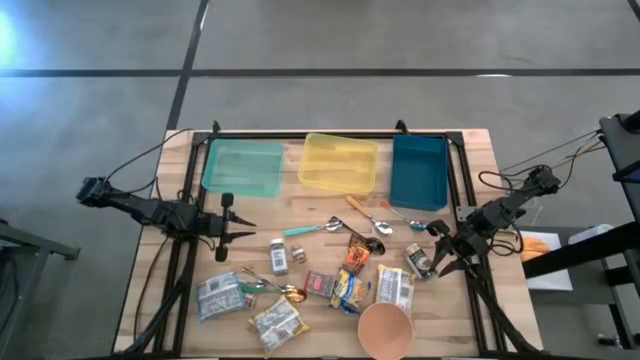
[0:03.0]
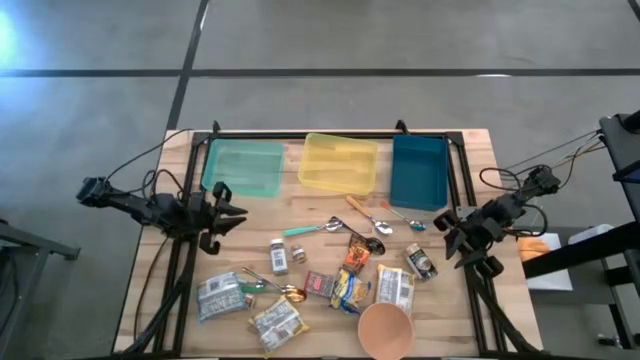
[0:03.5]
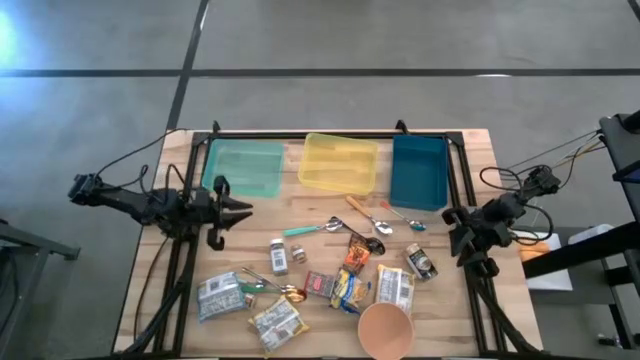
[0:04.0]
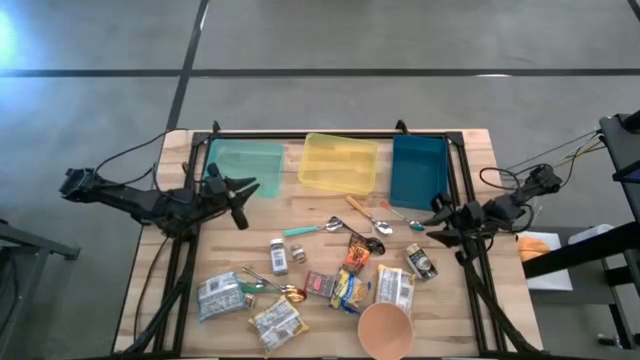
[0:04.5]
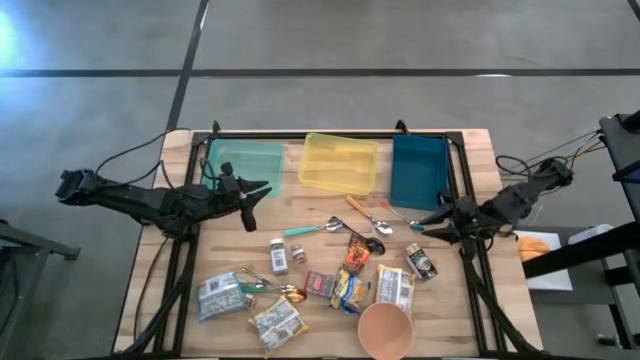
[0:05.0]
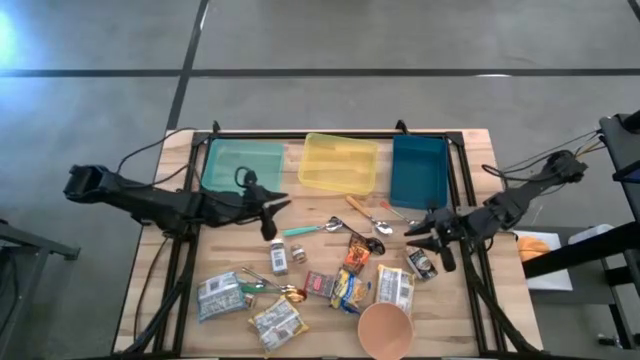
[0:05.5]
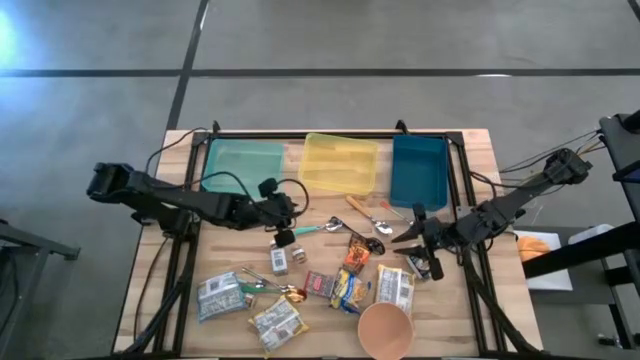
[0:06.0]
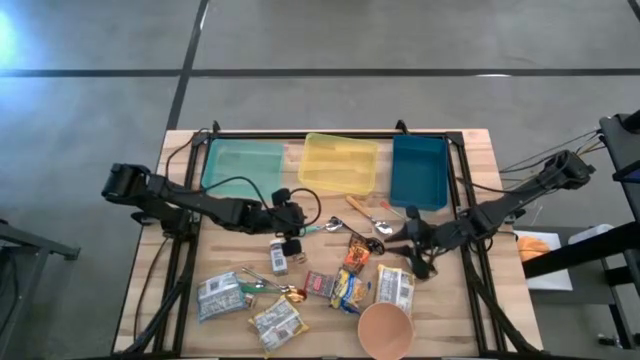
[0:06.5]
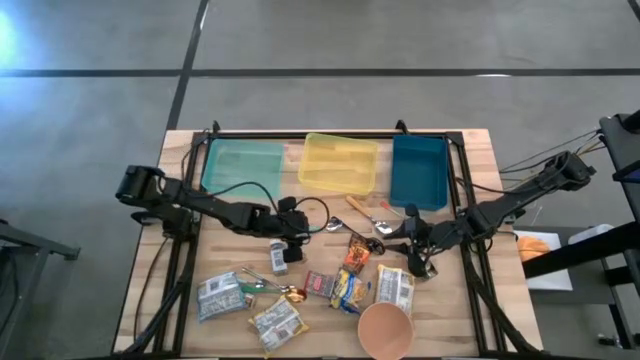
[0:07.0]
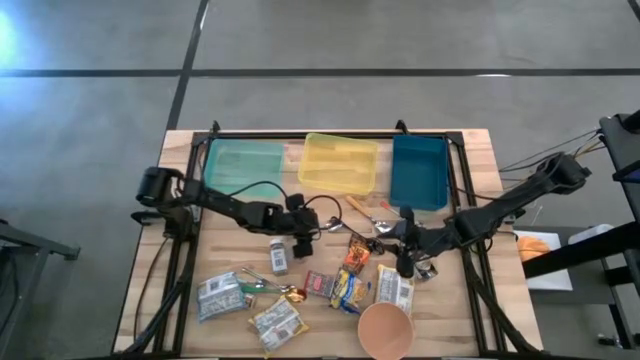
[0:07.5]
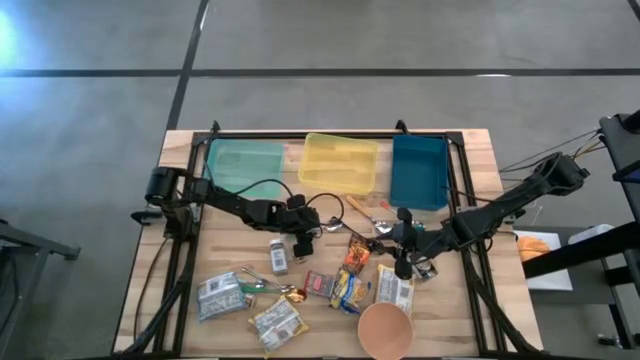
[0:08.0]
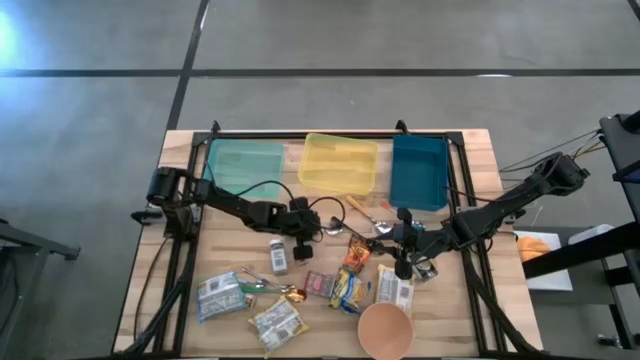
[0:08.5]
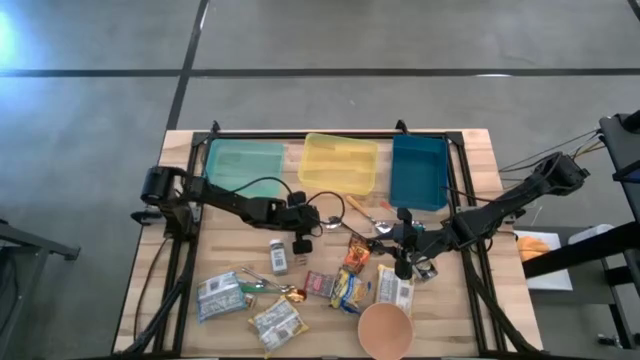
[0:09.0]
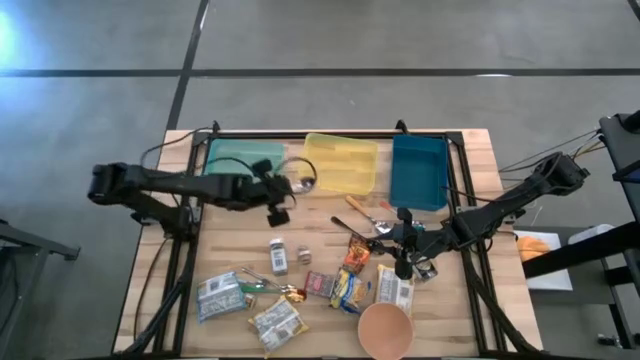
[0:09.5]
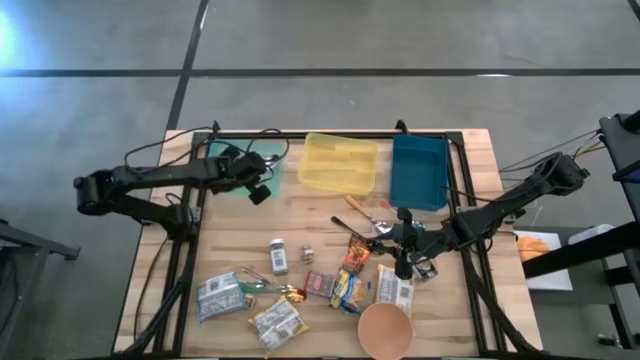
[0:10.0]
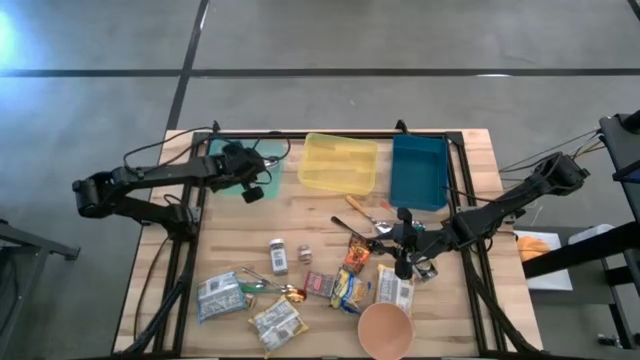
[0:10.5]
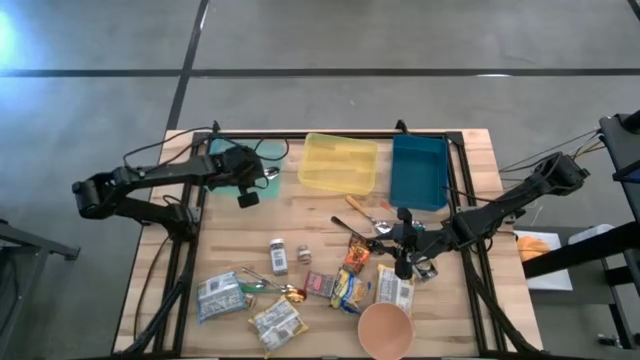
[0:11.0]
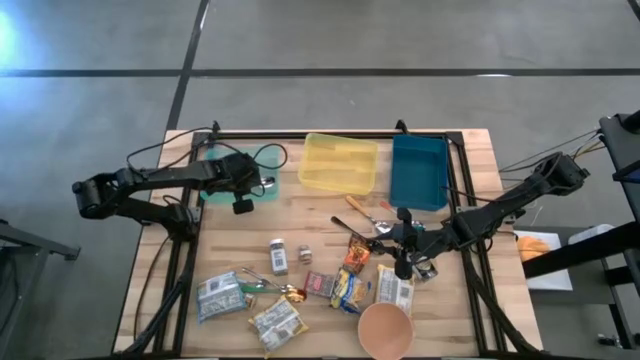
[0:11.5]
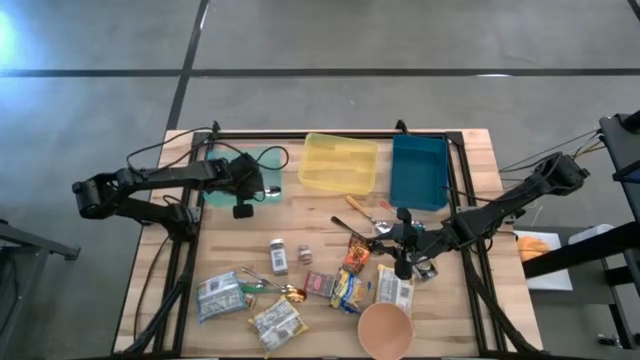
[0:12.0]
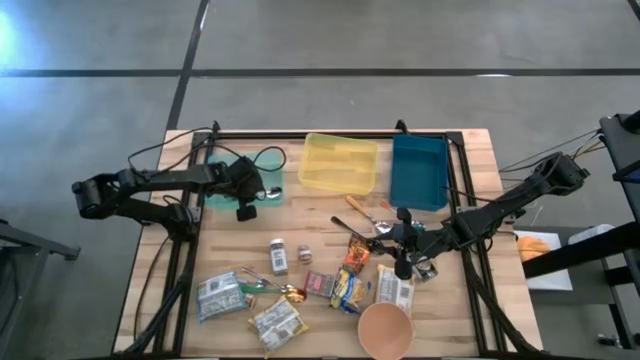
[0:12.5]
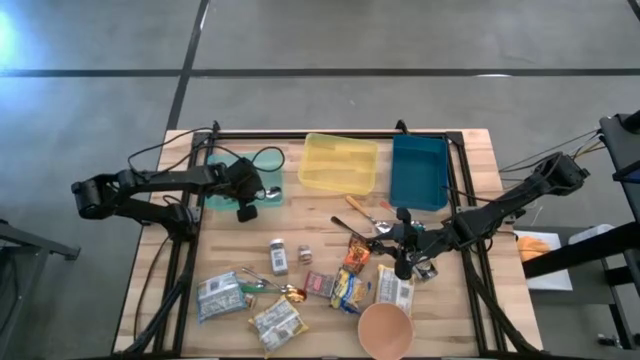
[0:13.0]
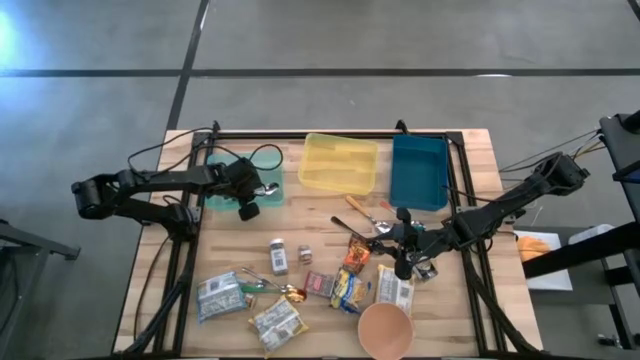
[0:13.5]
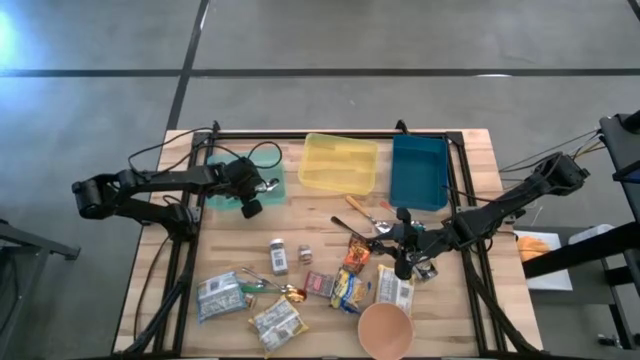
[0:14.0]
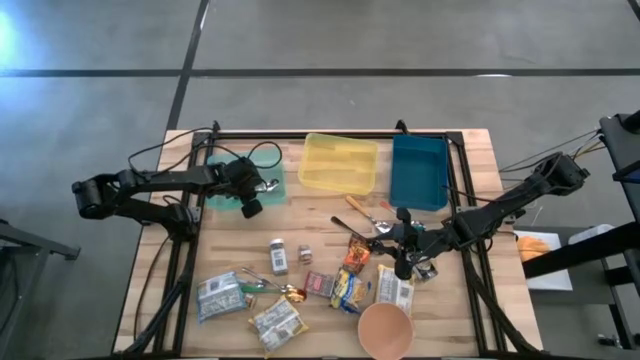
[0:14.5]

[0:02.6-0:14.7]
Put the green spoon into the green bin
